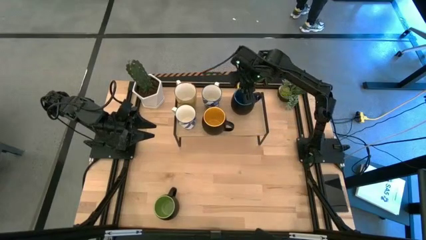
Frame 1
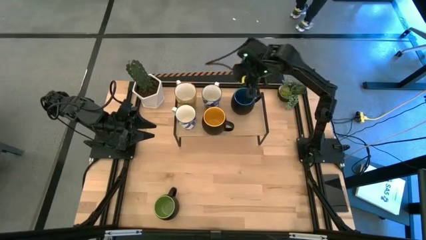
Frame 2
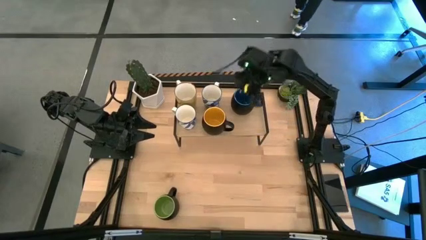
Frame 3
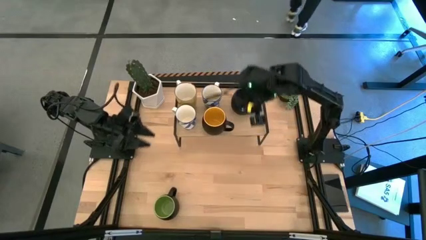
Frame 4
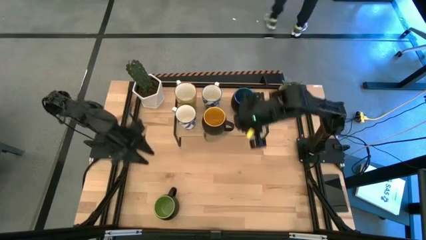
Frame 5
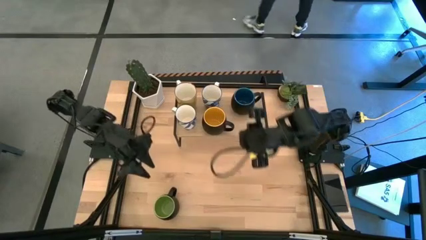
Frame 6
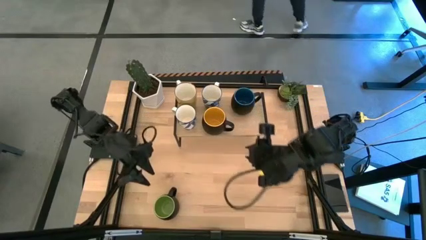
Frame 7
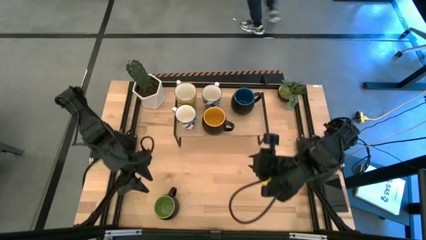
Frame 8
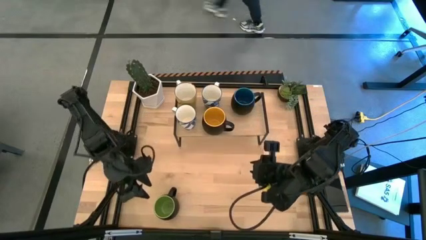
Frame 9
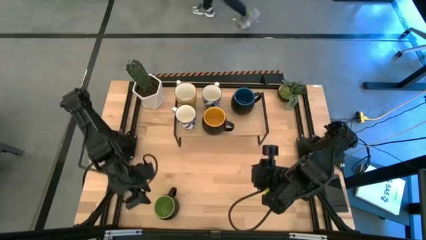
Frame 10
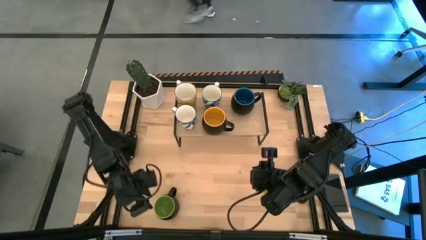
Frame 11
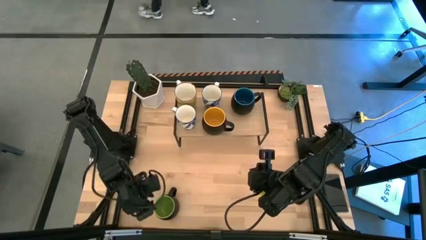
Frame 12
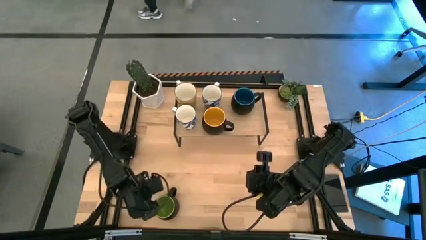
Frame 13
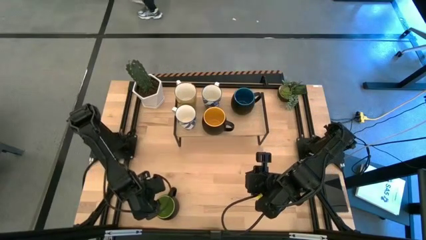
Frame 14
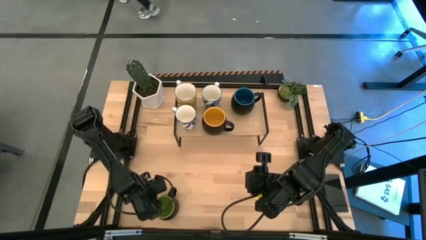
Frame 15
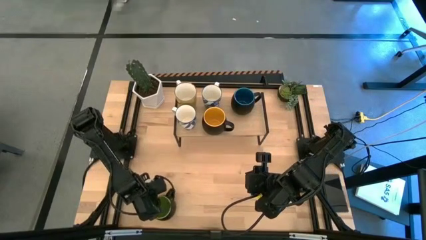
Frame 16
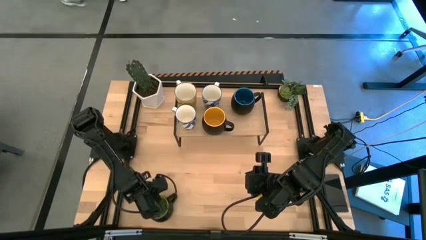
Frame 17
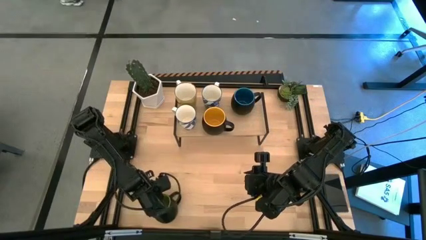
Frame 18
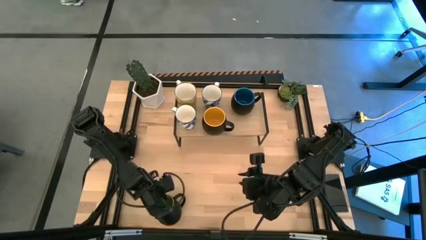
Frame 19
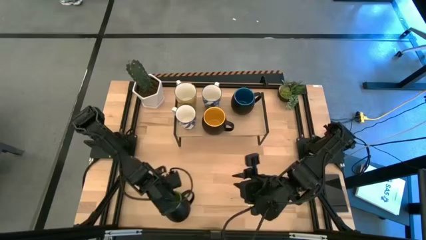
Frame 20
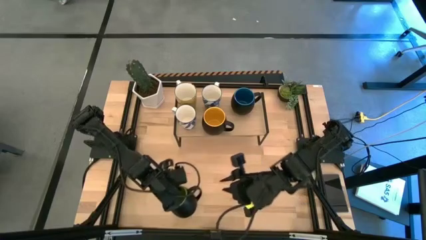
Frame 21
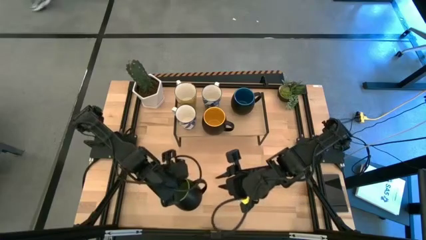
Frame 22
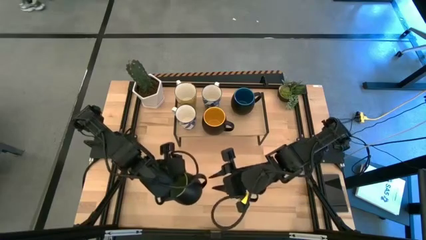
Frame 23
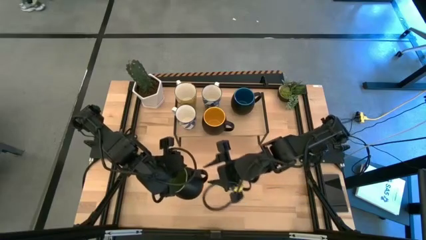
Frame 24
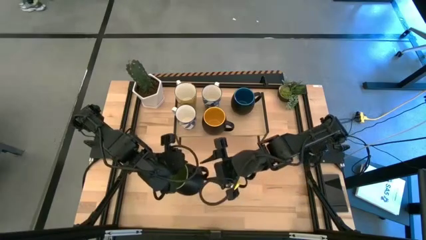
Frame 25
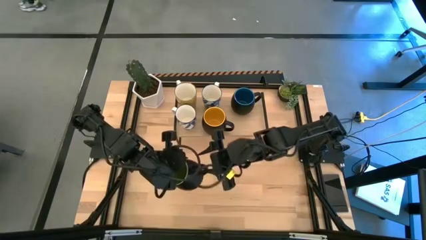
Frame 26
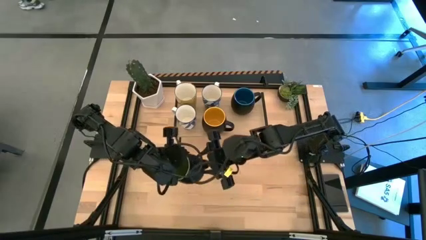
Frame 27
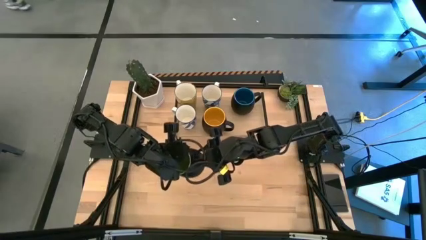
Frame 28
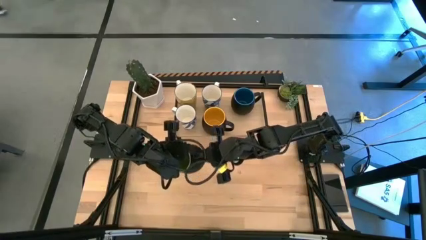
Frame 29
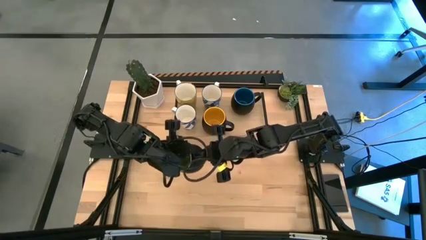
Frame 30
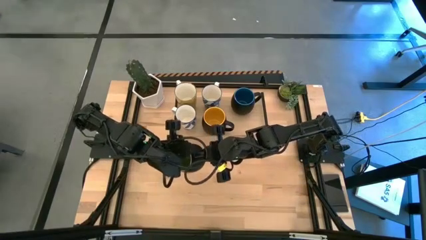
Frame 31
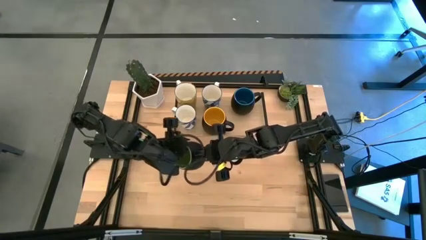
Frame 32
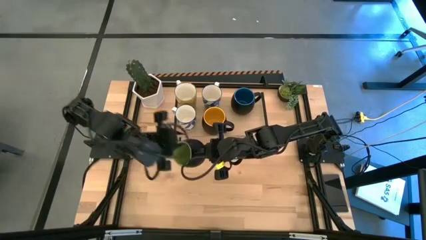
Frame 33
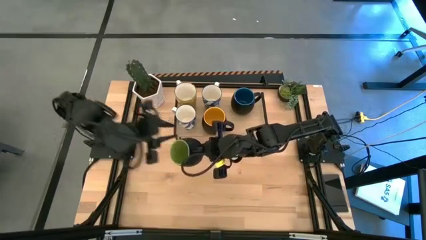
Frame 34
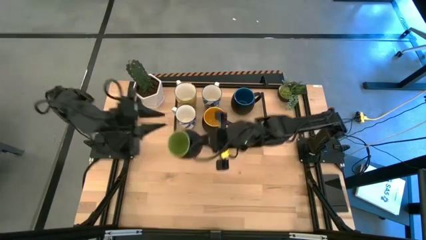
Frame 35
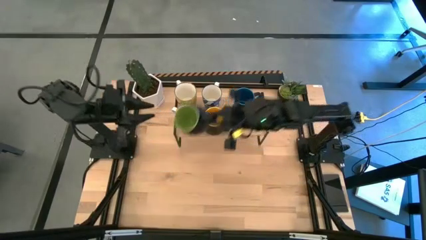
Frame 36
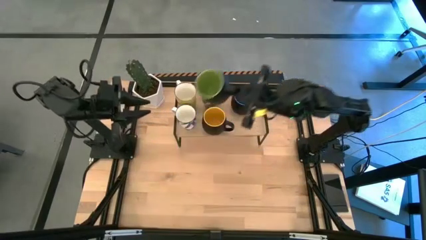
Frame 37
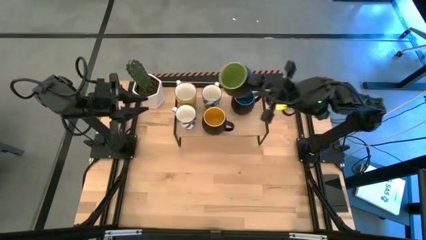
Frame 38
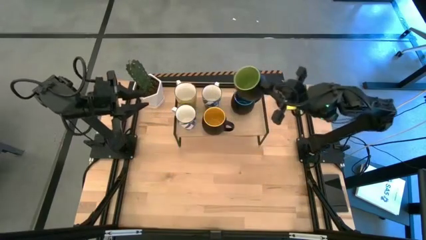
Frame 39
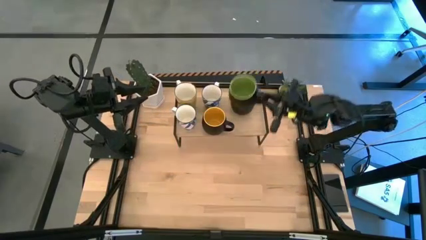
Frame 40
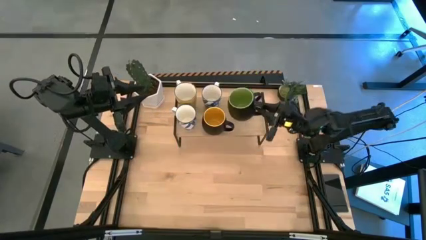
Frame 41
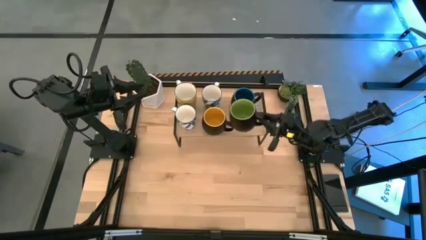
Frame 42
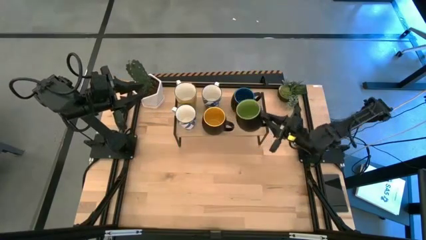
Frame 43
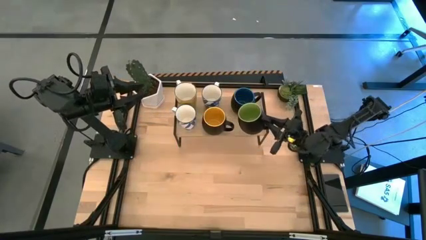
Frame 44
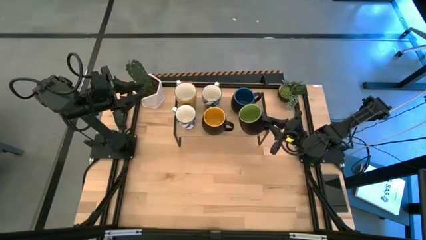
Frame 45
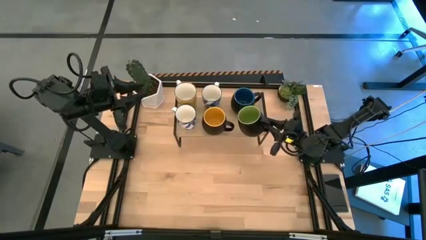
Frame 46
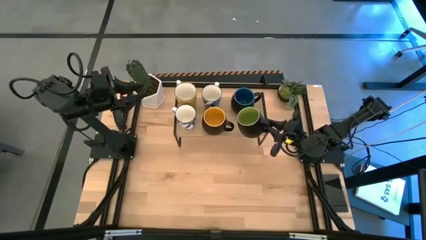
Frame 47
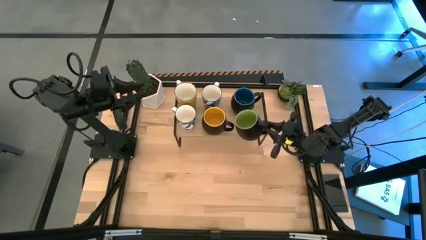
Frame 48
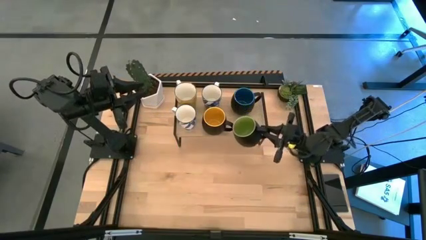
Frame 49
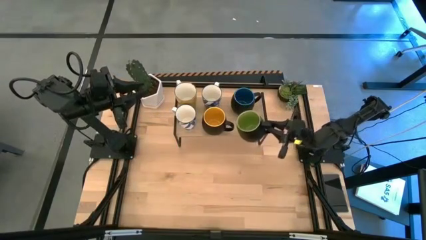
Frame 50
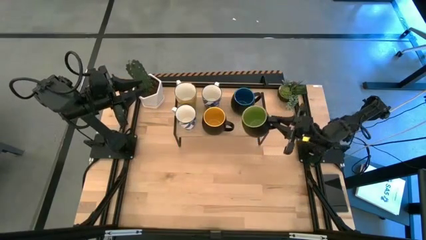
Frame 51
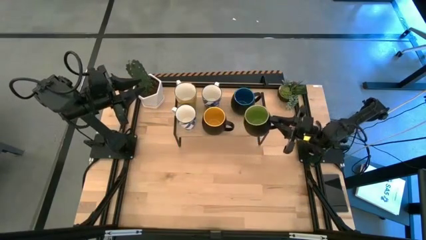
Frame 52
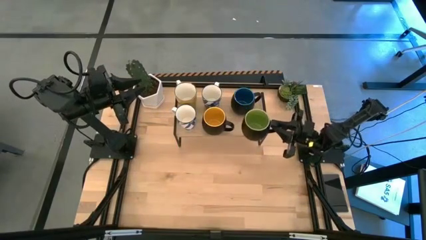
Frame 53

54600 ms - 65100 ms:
Task: Place coffee mugs
Put the black and green cup on the shelf aligned with the other black and blue cup

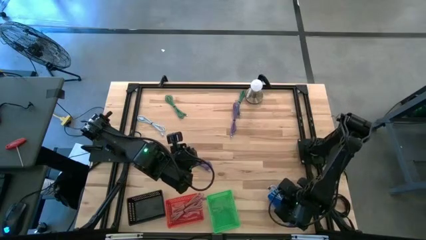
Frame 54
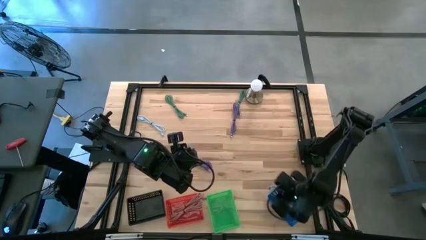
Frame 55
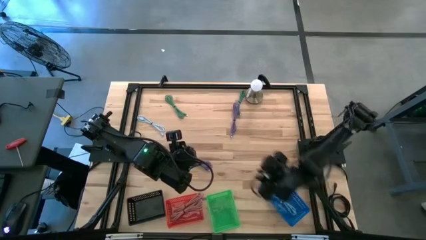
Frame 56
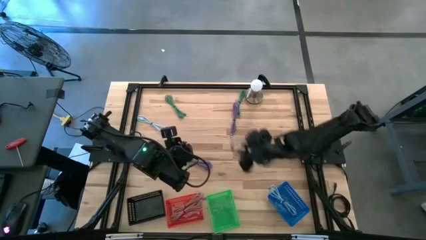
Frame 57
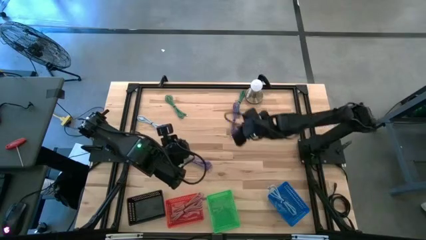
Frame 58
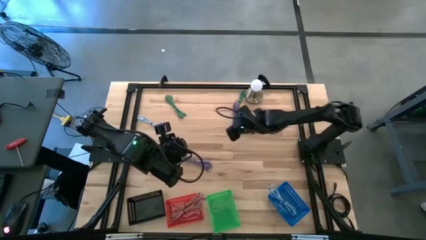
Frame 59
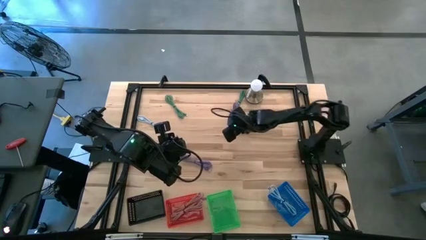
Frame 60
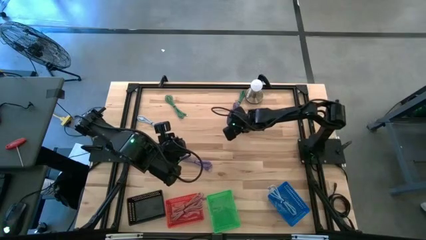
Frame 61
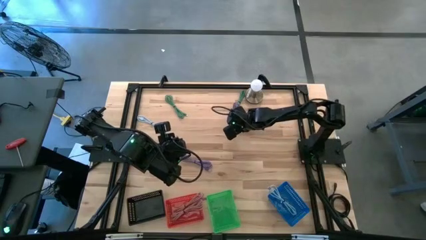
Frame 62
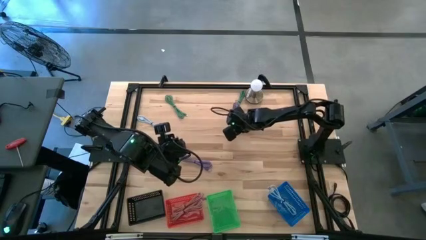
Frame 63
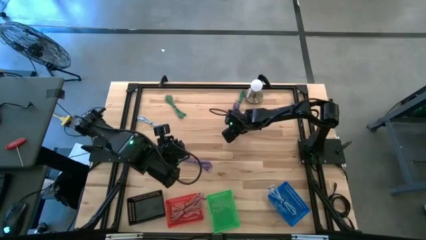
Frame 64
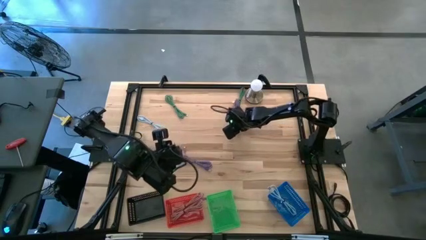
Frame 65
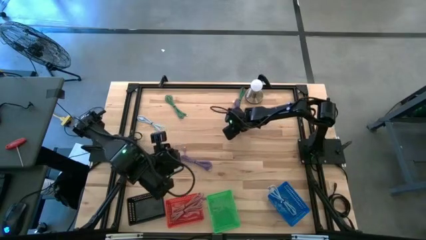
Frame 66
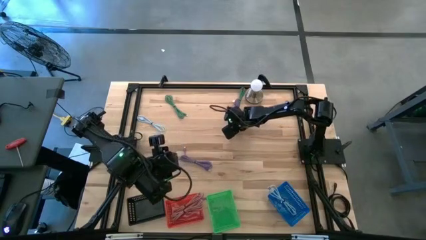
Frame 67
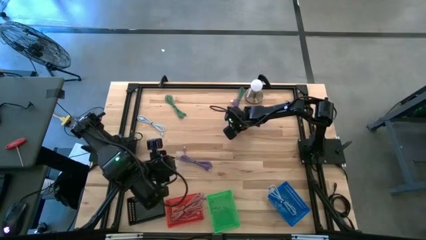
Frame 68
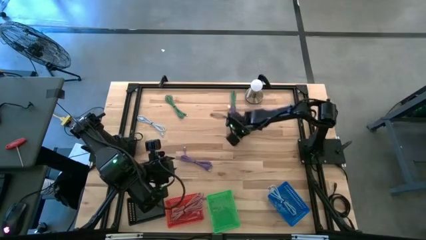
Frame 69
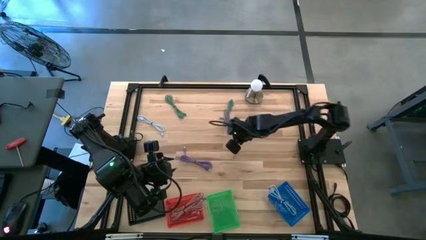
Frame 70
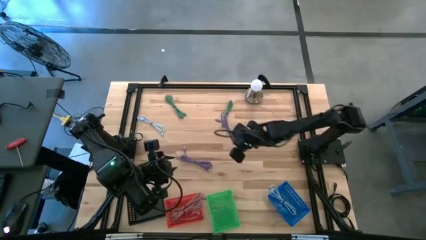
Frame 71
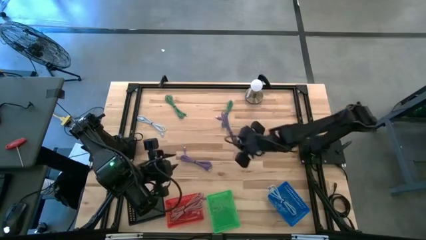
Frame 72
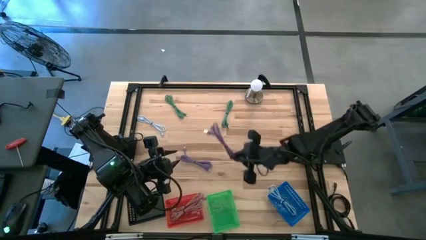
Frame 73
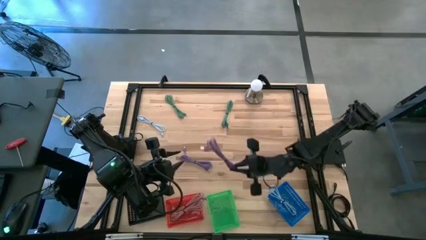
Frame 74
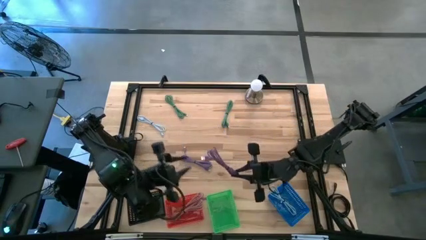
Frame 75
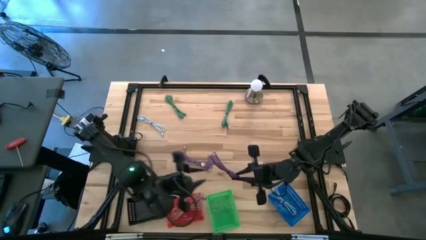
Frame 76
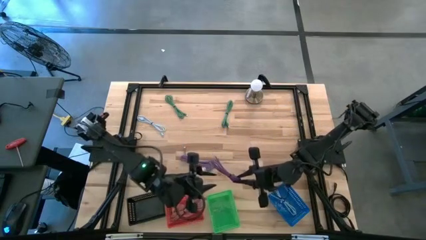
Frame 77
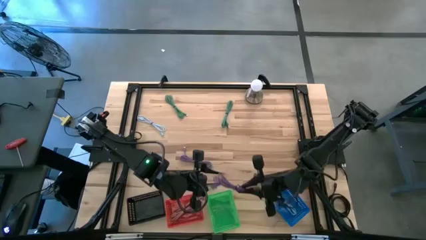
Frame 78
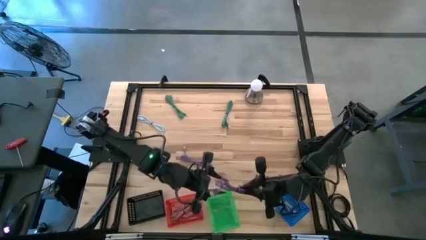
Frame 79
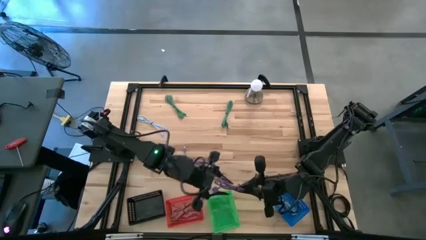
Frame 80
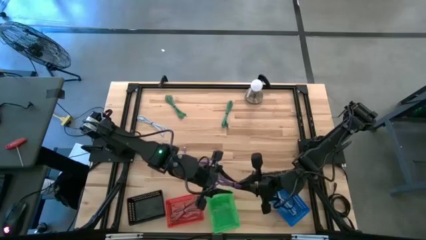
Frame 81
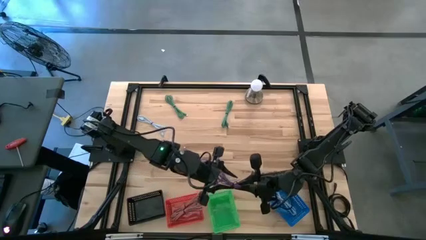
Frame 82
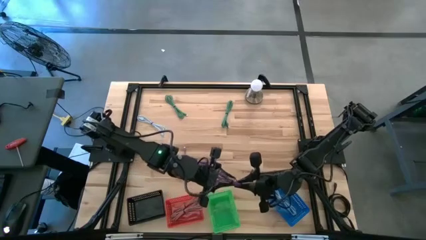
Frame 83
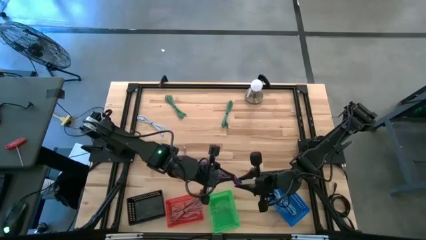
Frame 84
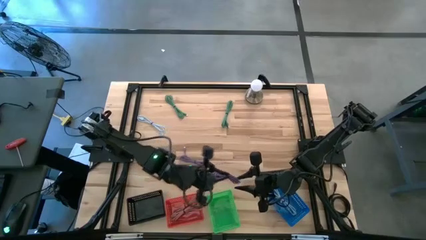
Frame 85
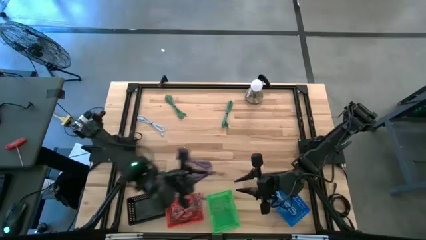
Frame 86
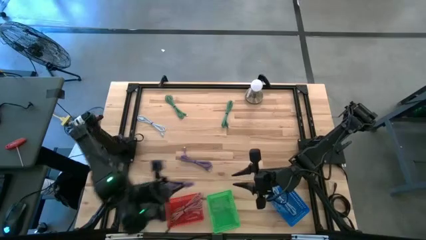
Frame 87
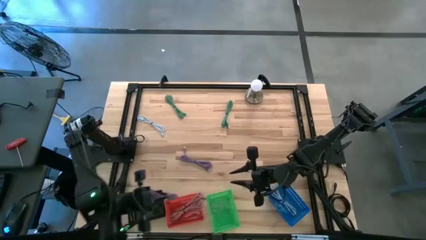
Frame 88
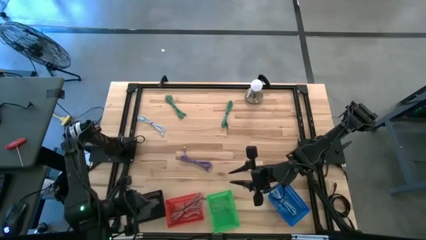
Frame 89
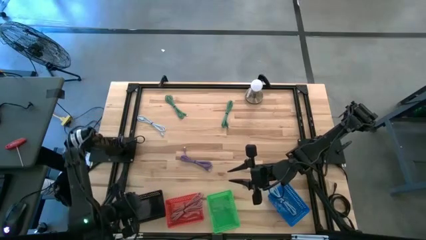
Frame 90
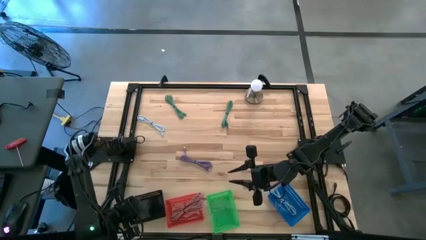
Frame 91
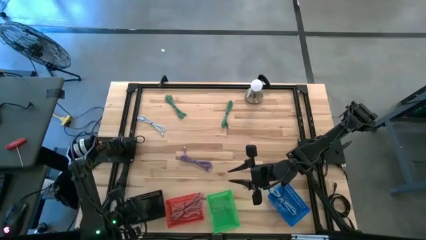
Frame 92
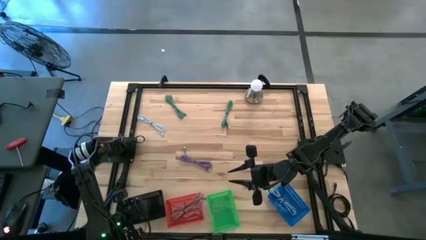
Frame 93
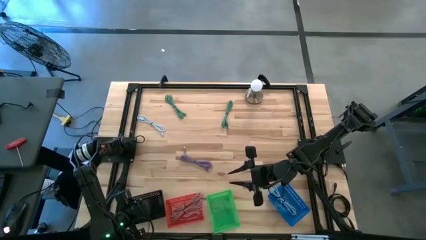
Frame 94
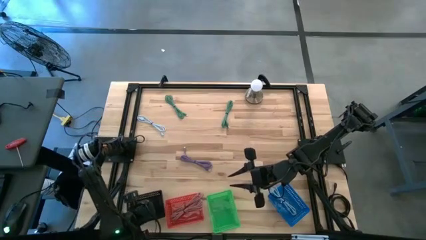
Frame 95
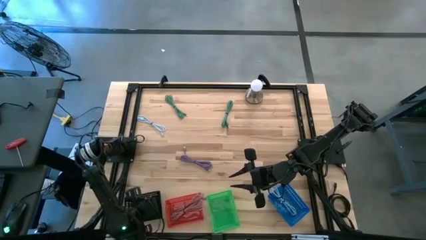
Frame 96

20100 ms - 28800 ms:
Task: Pick & Place USB Port
Put the purple USB charger into the black bin
